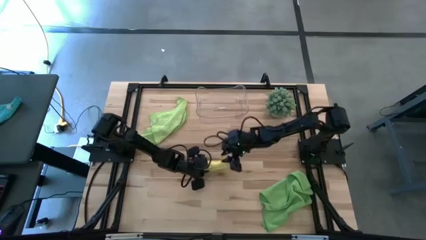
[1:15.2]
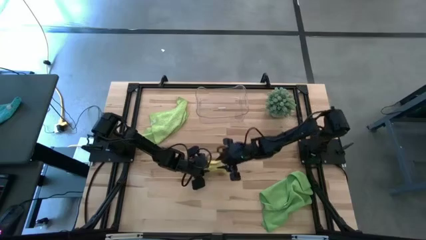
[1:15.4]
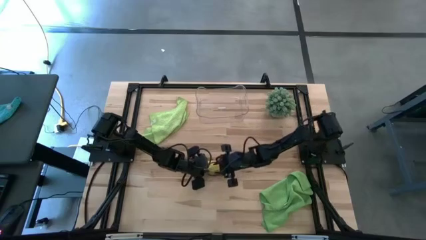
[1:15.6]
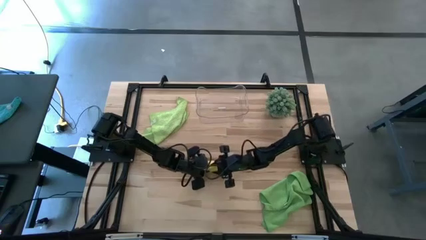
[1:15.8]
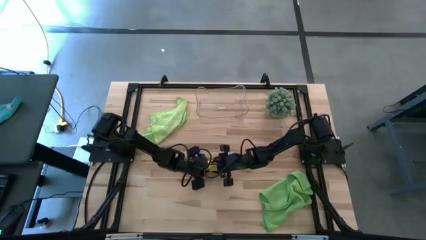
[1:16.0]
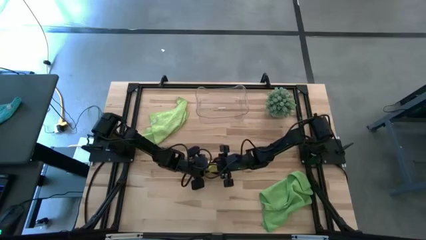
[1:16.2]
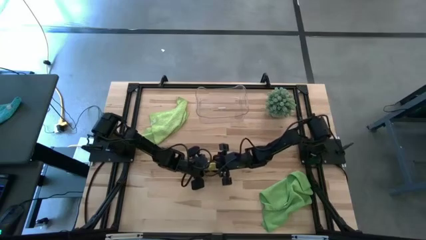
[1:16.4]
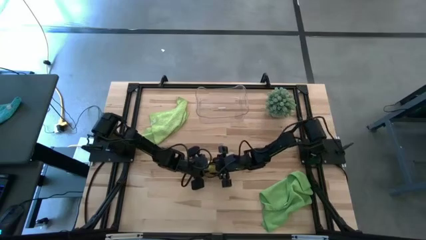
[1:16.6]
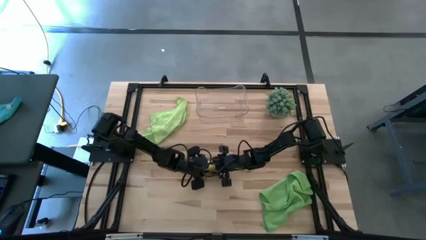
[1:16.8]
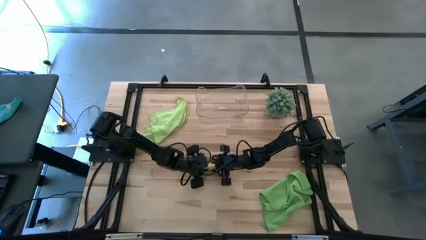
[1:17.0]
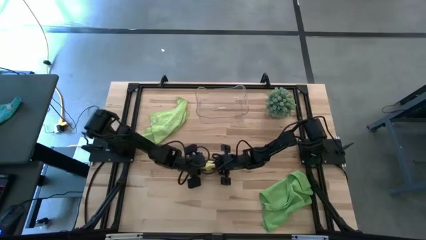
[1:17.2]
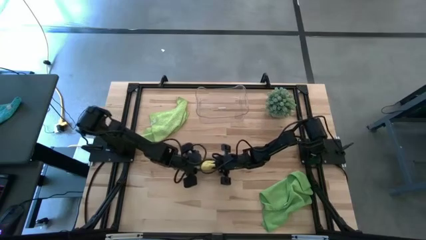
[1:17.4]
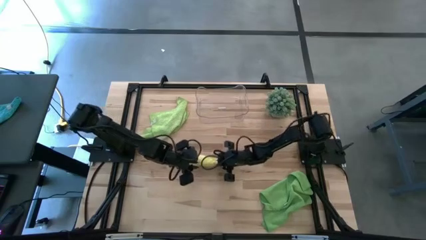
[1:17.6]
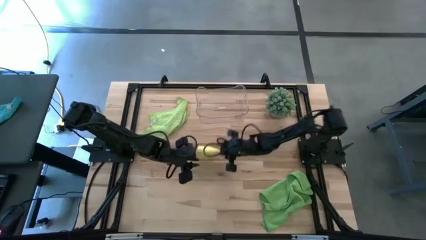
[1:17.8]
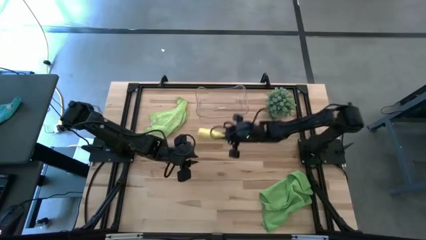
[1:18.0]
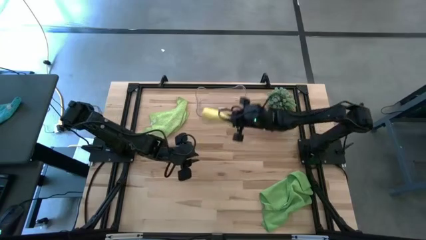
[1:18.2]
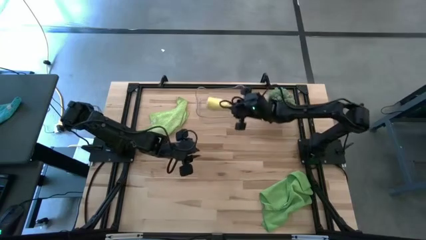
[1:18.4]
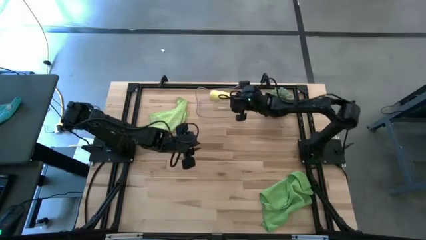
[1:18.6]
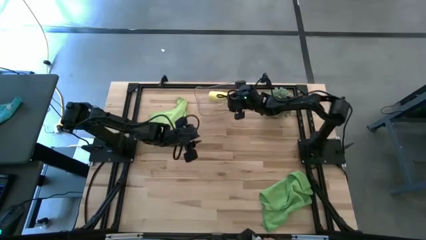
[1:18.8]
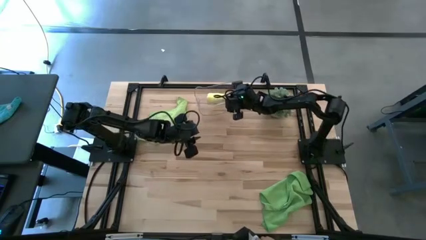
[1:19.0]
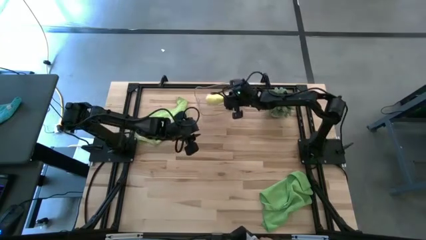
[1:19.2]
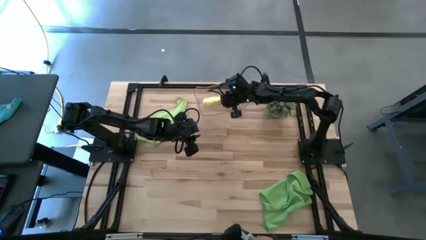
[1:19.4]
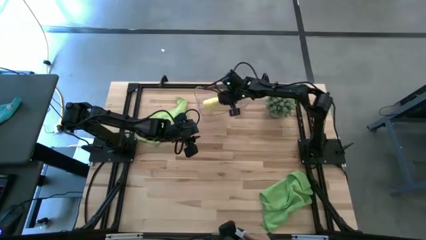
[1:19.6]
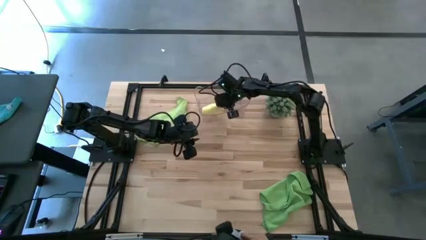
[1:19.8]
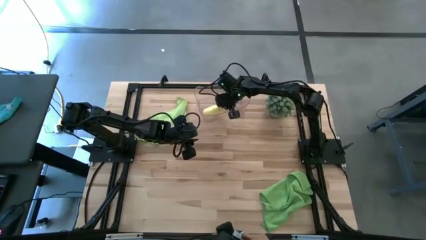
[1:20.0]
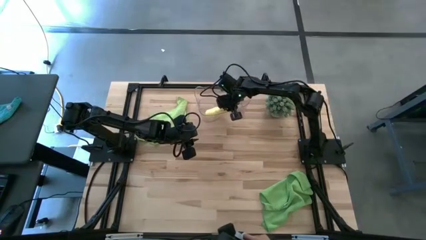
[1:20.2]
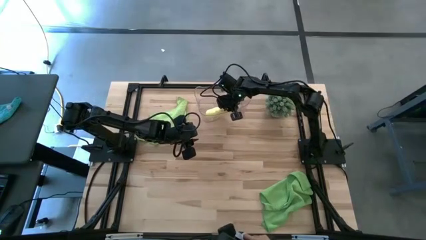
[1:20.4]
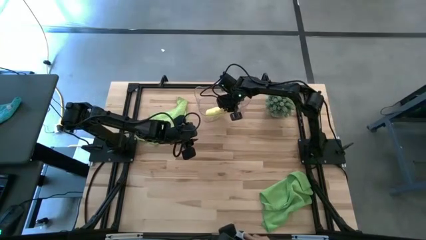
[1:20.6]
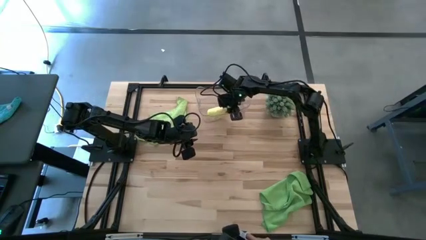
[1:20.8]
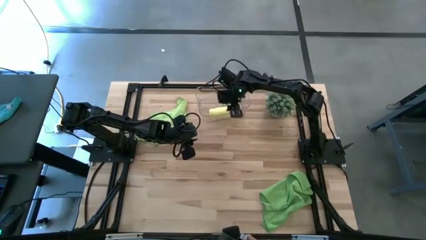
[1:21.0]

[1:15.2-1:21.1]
Task: Roll microfiber towels into tight, uniform cylinder then place into a basket
Put the rolled yellow microfiber towel into the transparent bin

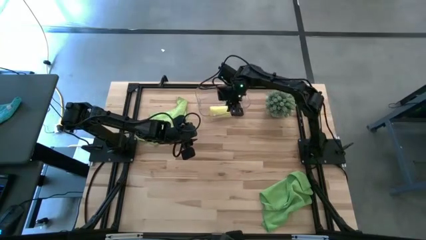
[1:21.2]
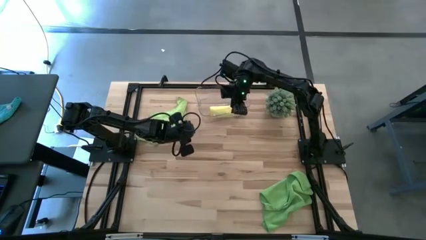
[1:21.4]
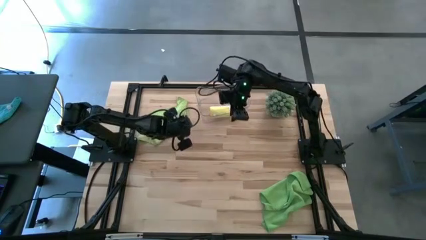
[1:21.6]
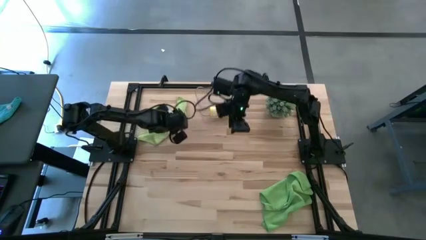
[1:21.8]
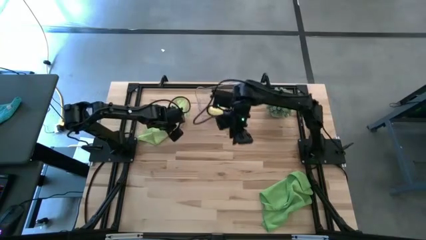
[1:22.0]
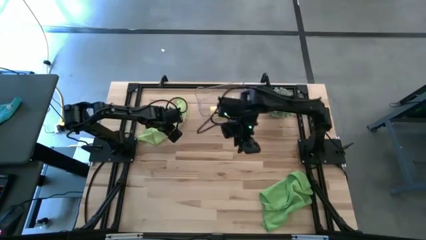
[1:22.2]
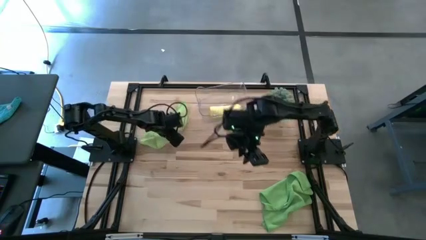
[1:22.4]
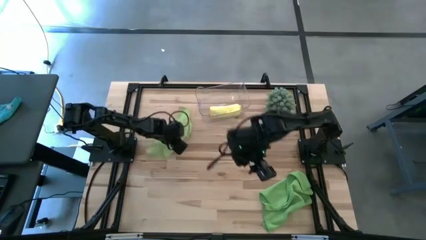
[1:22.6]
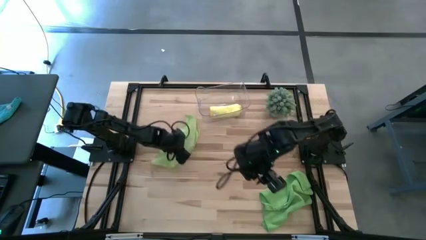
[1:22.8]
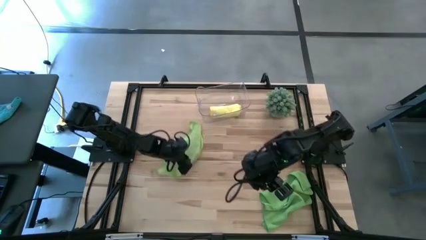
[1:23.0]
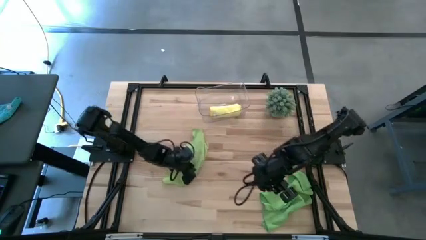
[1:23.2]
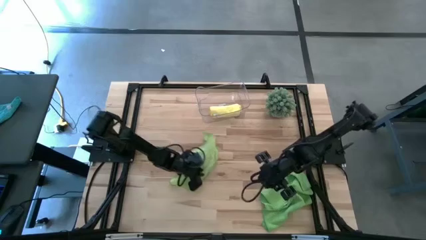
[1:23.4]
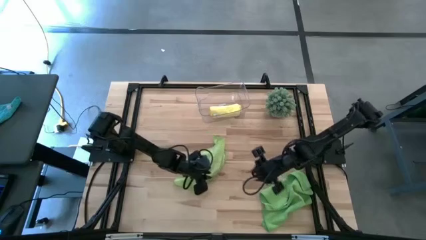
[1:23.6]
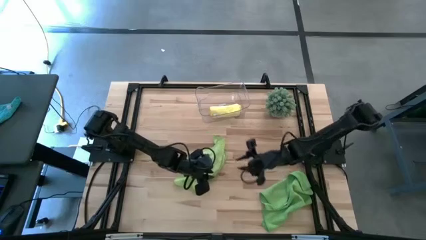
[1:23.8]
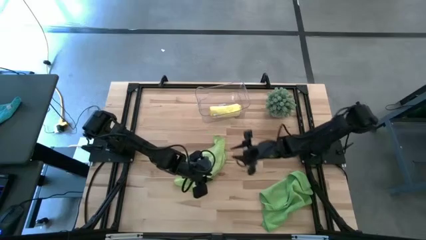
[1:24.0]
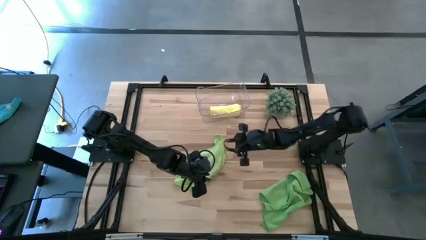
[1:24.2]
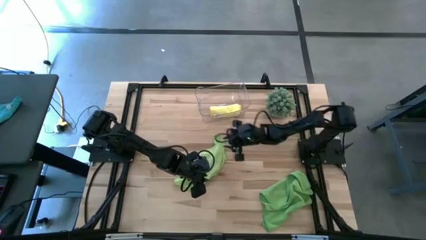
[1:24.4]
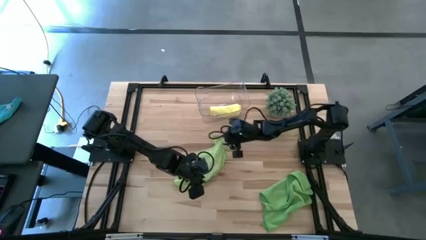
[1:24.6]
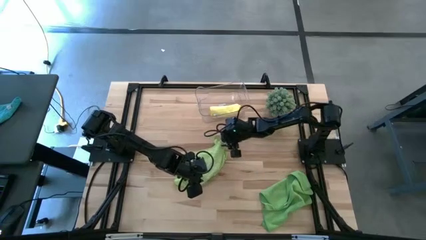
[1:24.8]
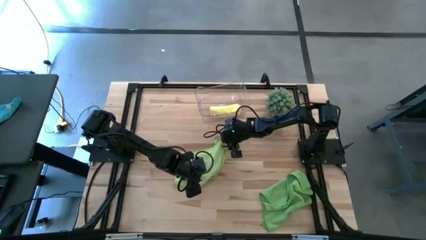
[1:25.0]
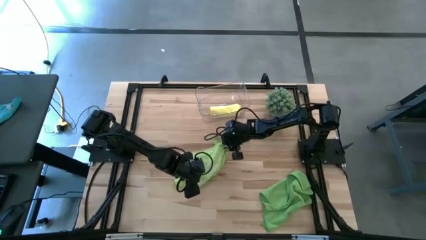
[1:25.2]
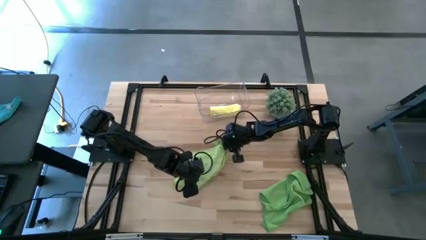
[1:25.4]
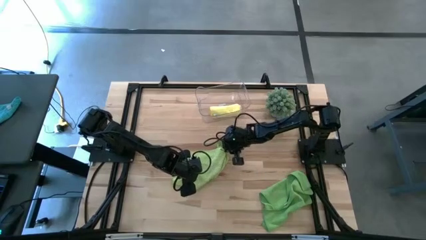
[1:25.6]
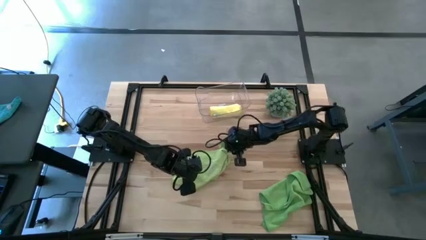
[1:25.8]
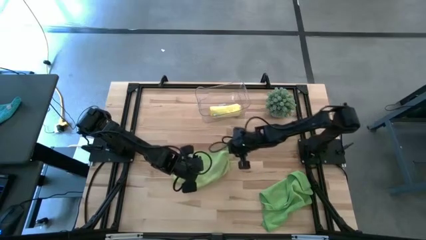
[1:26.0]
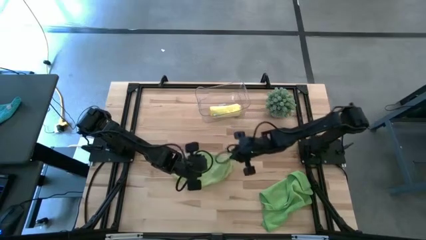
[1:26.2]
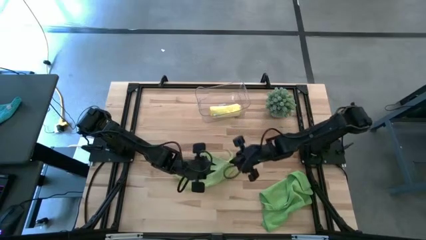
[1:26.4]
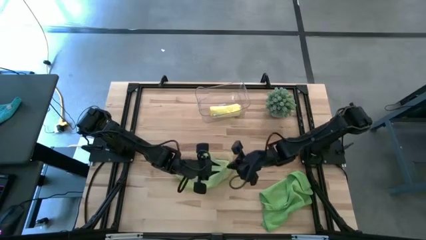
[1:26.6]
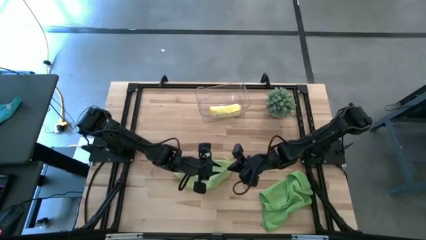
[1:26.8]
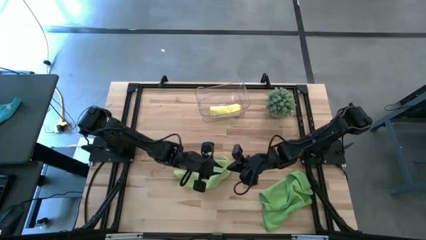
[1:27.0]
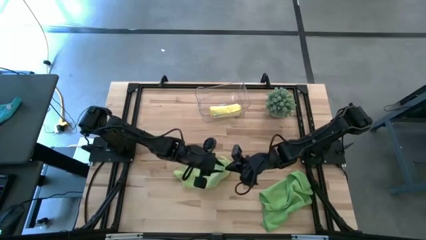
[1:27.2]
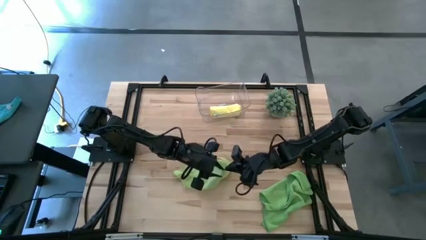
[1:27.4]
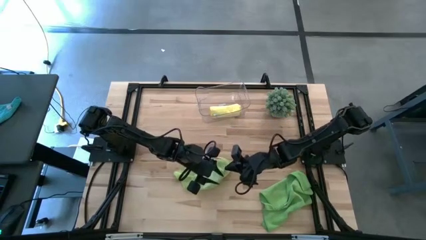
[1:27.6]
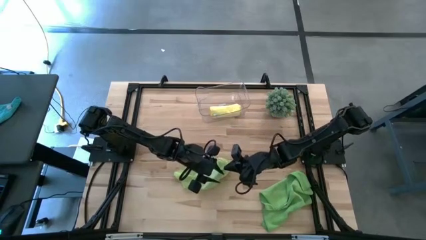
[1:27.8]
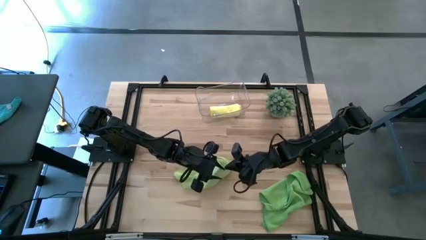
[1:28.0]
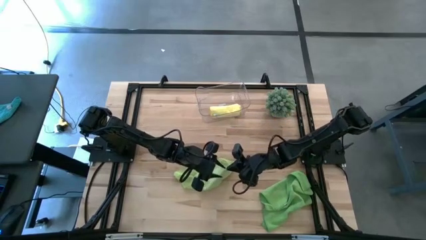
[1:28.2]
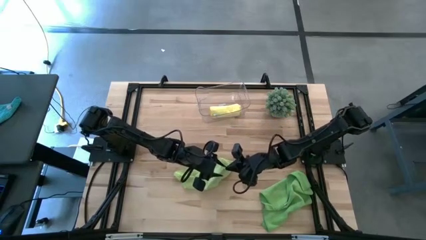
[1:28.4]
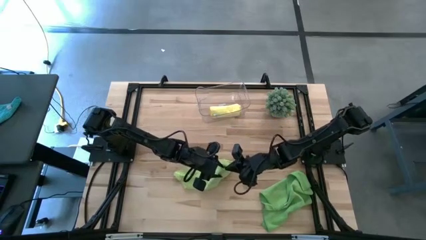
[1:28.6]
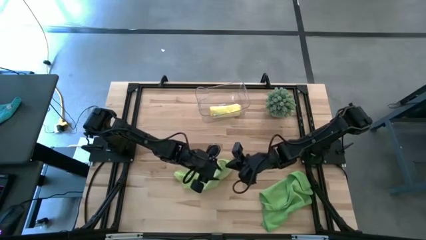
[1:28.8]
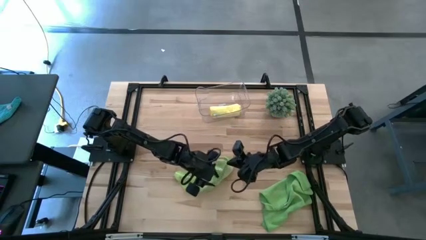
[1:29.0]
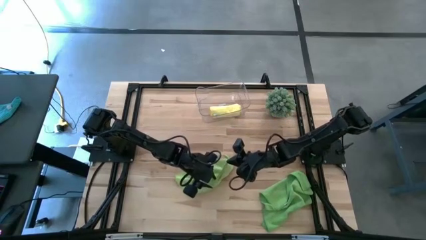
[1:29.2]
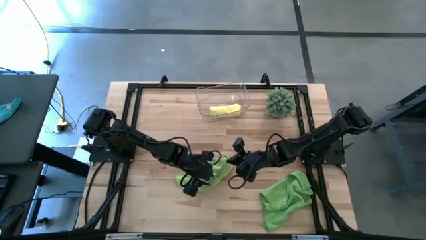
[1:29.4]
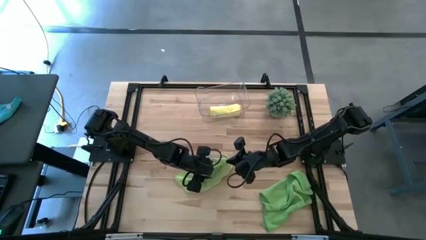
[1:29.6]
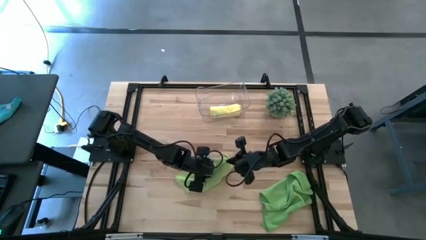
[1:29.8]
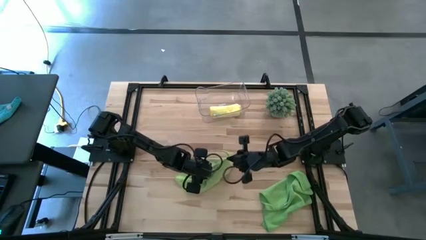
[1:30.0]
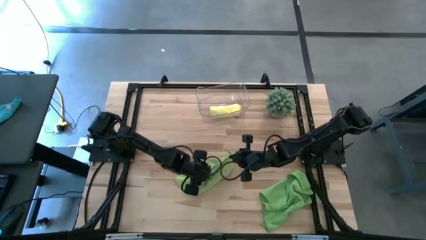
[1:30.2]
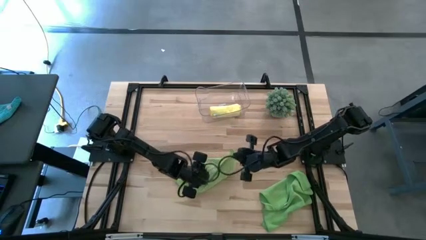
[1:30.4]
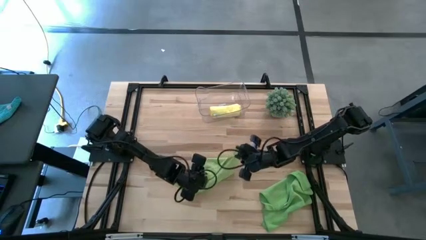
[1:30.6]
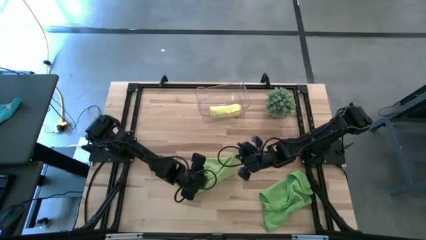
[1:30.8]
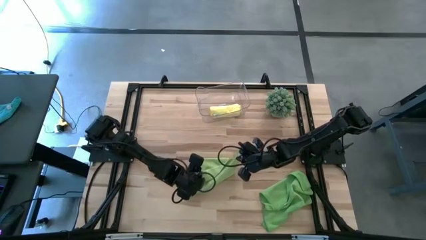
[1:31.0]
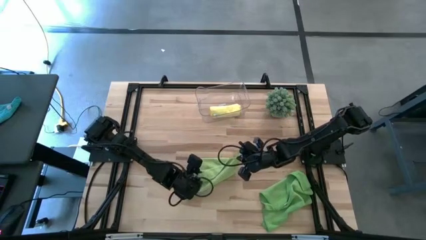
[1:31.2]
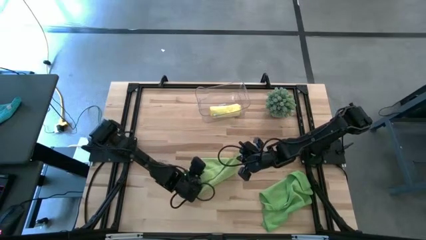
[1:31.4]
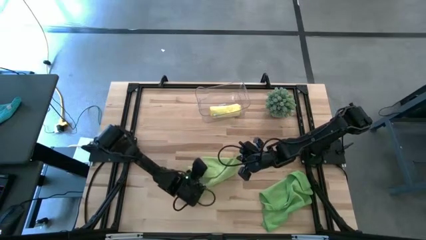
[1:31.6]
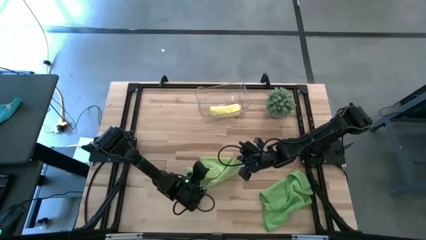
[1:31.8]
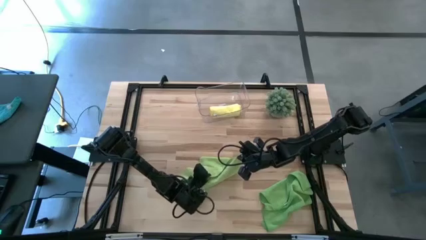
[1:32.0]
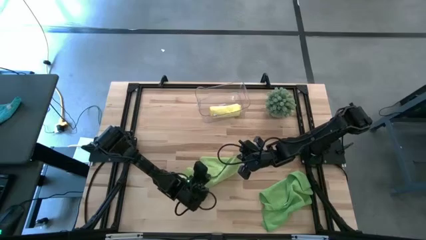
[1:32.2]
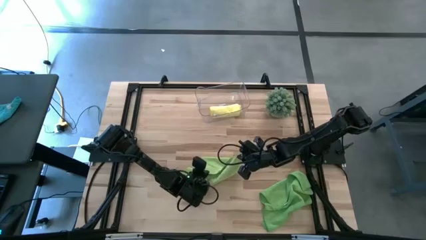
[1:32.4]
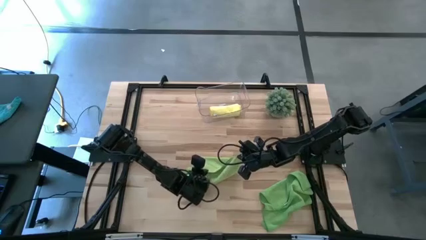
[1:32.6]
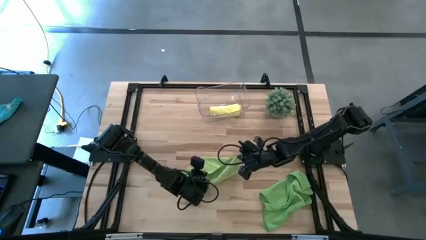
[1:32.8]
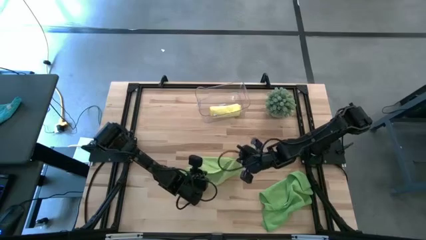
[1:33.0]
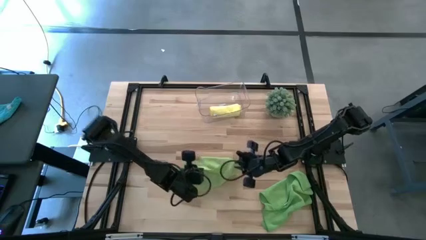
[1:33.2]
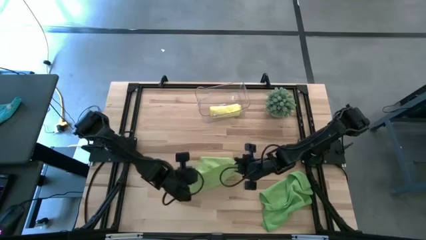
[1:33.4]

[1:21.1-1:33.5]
Fold the light green microfiber towel
